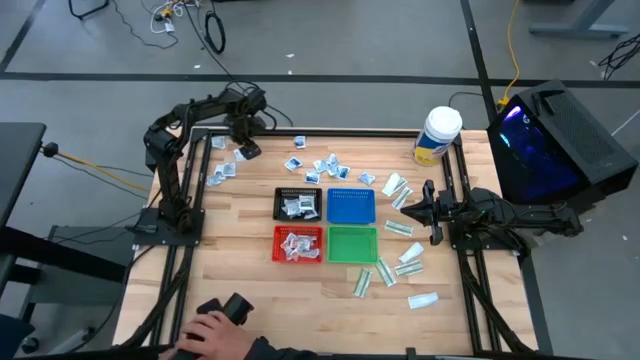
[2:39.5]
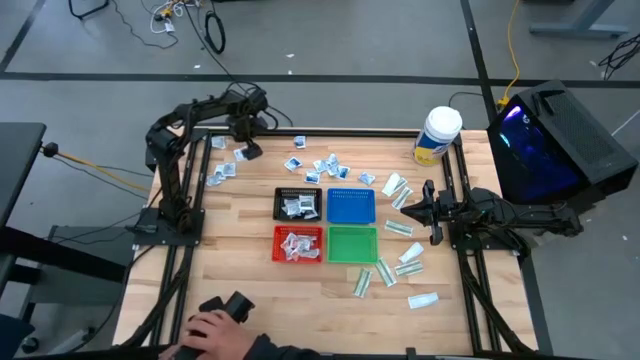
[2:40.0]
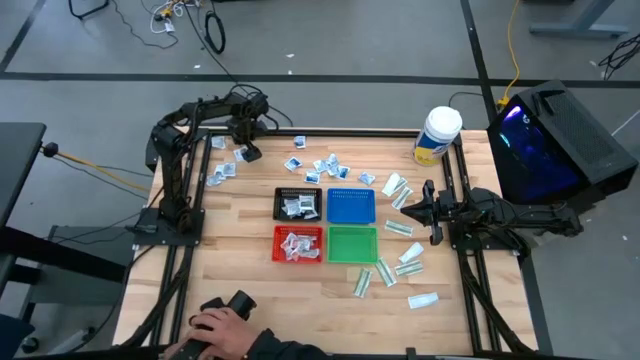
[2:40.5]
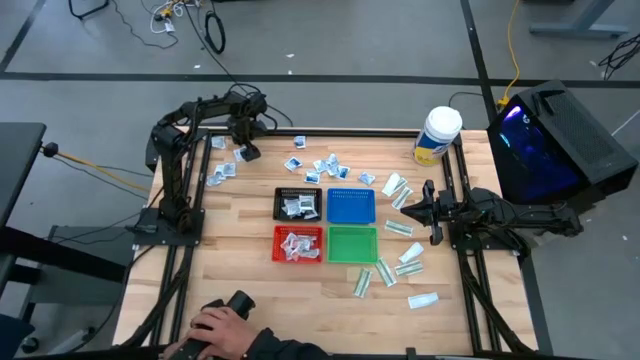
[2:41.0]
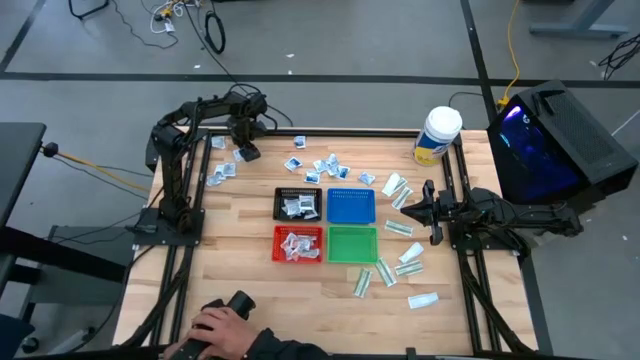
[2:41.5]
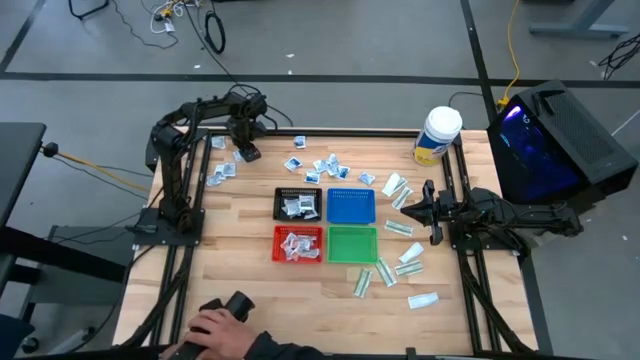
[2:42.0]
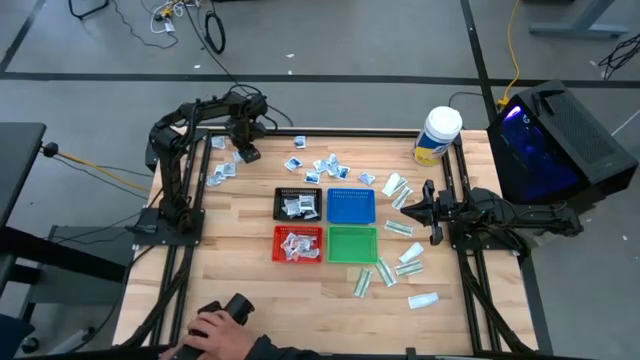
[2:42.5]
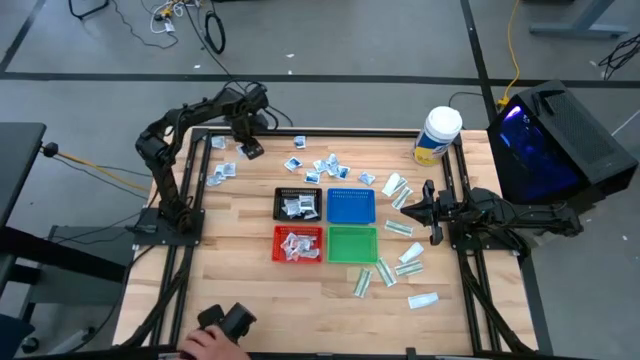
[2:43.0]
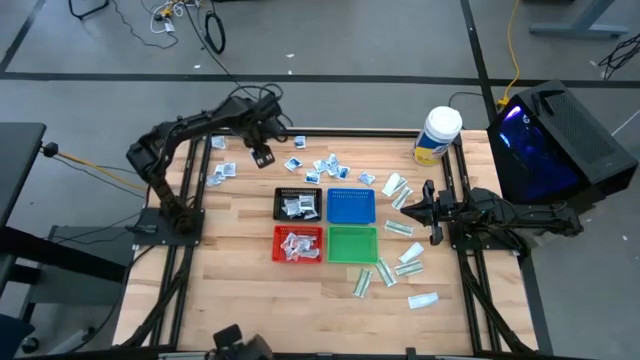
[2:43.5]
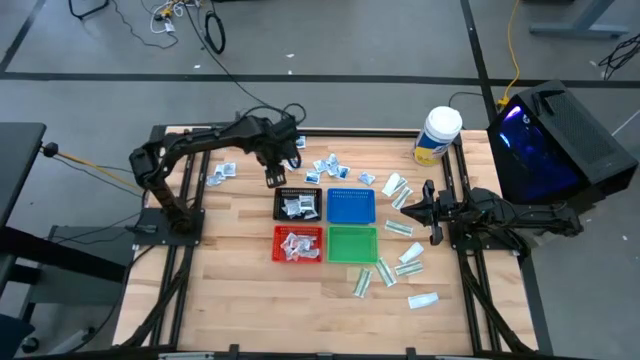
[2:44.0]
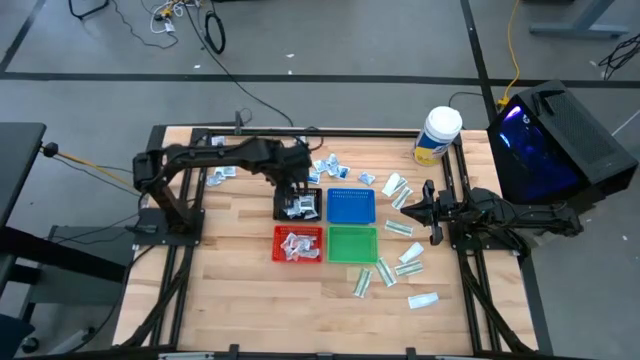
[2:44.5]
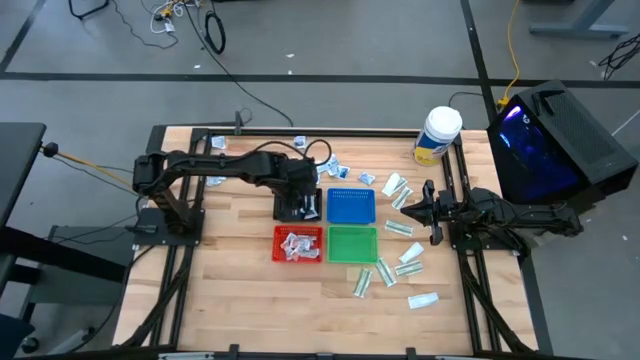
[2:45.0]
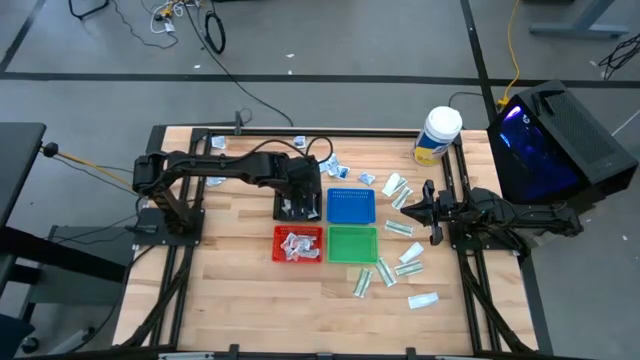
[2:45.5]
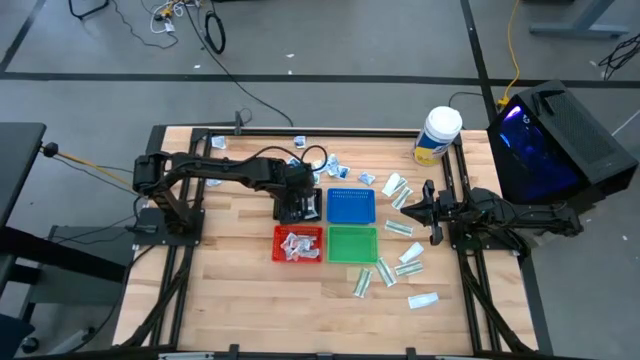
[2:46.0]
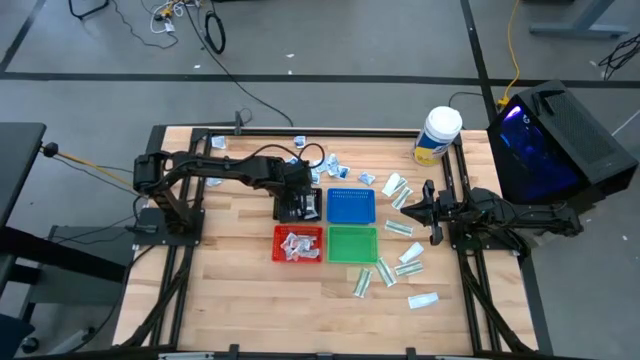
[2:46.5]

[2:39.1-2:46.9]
Task: Pick & Place First Aid Supplies
Put the gray towelette pack into the black bin

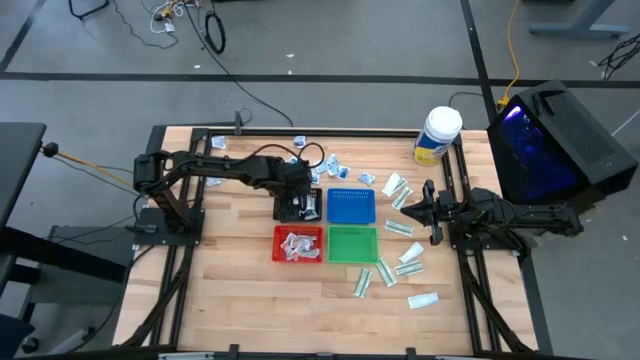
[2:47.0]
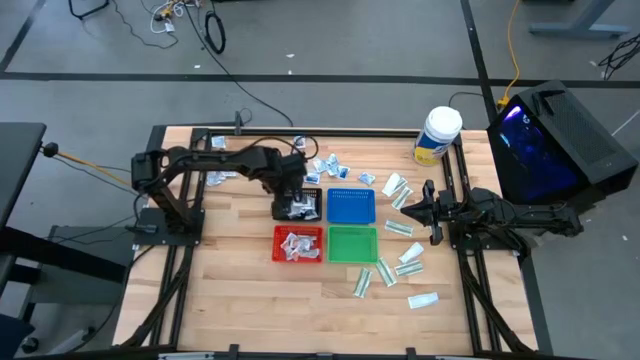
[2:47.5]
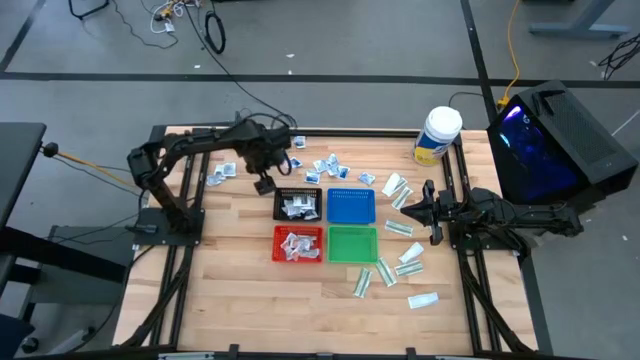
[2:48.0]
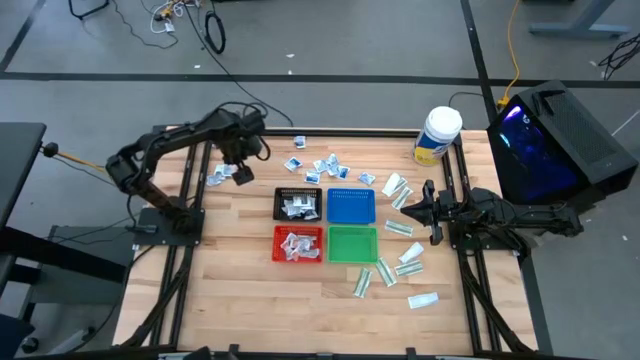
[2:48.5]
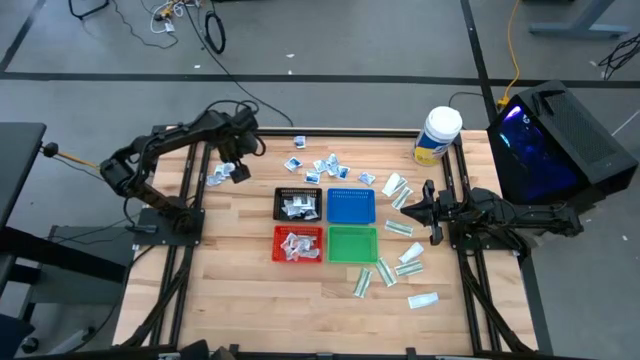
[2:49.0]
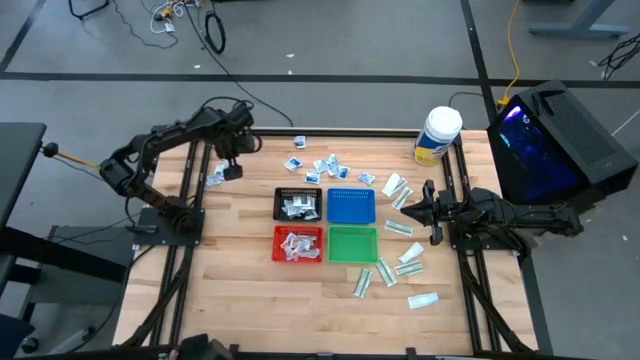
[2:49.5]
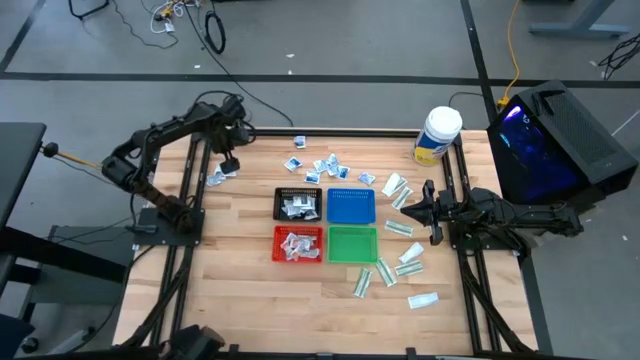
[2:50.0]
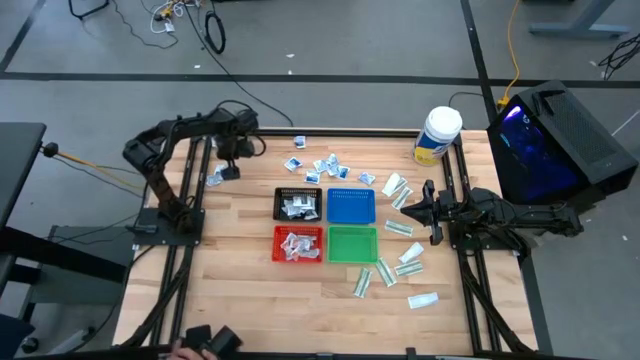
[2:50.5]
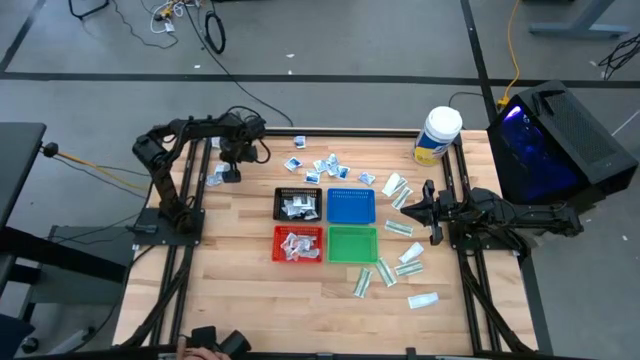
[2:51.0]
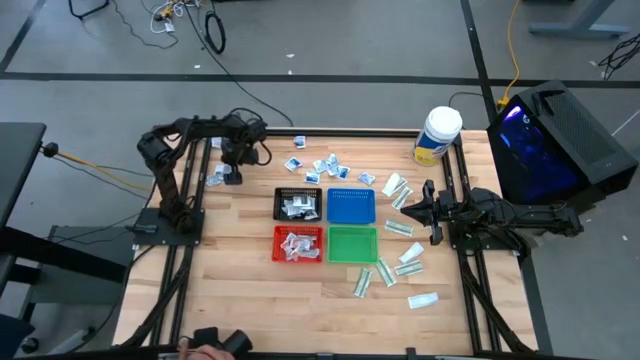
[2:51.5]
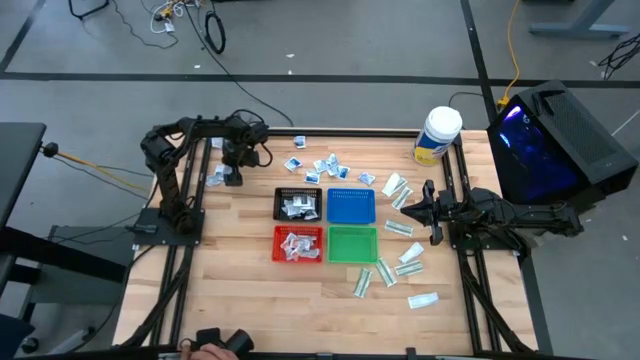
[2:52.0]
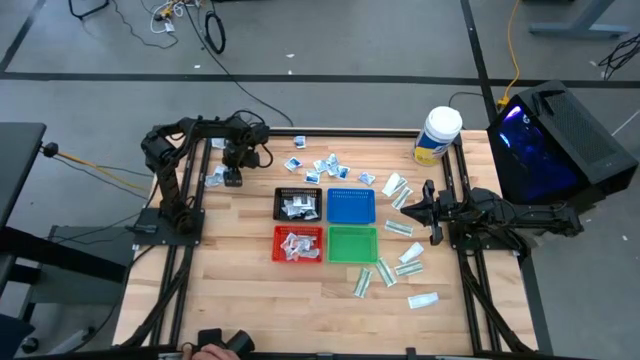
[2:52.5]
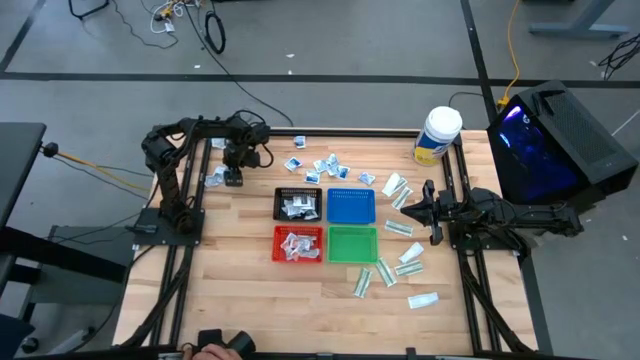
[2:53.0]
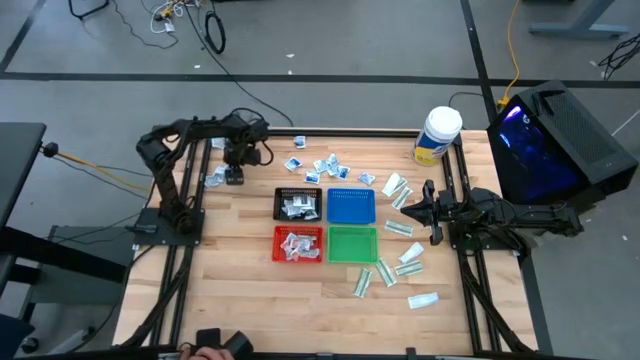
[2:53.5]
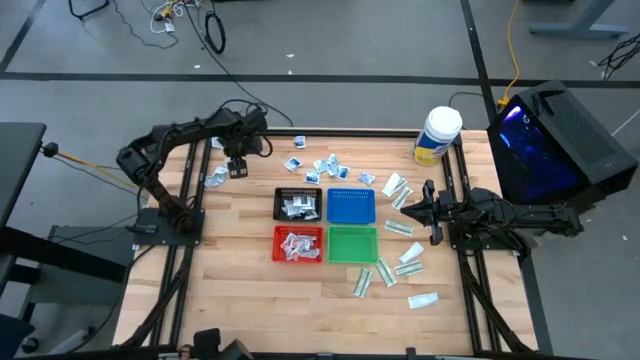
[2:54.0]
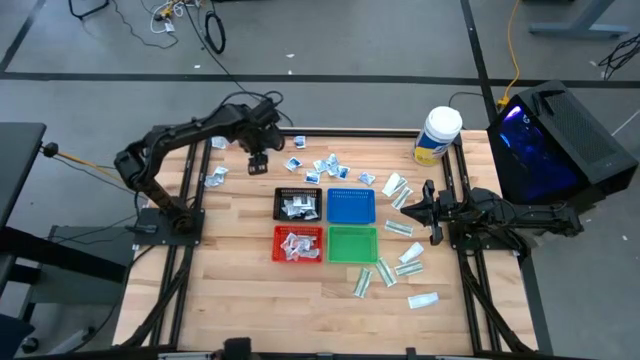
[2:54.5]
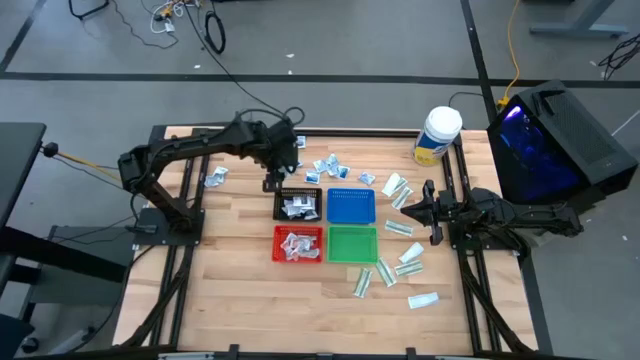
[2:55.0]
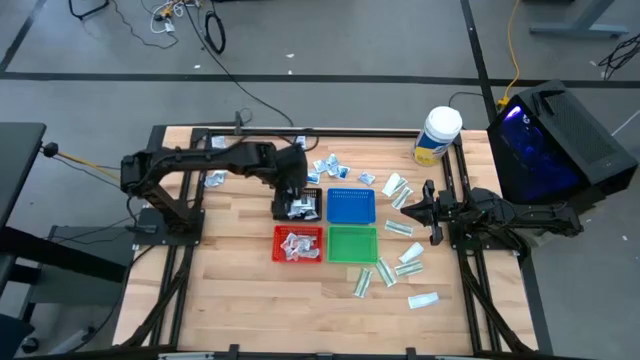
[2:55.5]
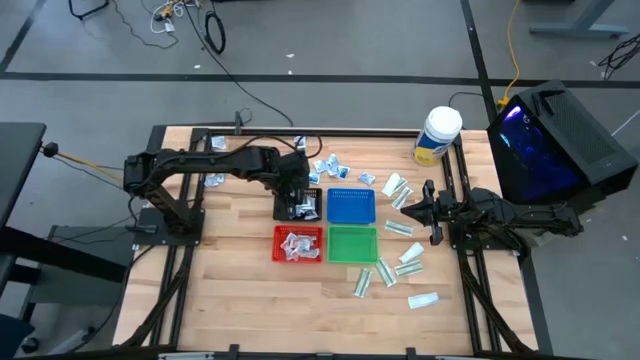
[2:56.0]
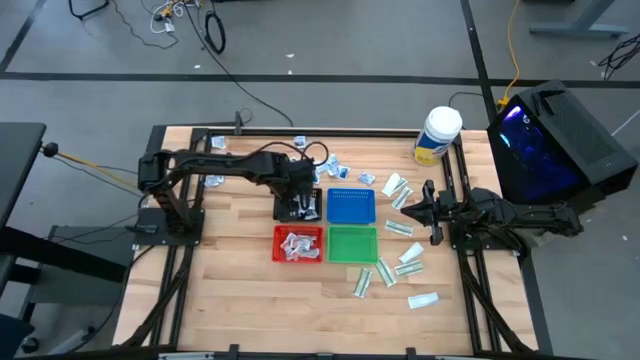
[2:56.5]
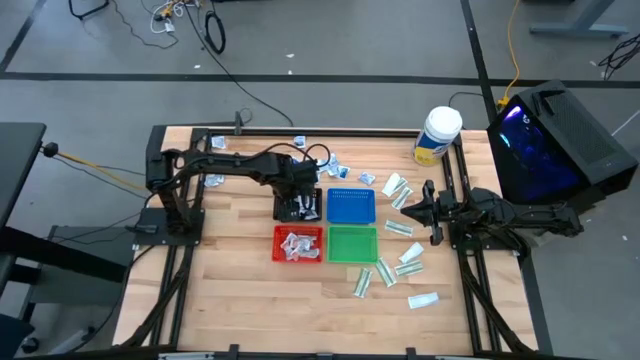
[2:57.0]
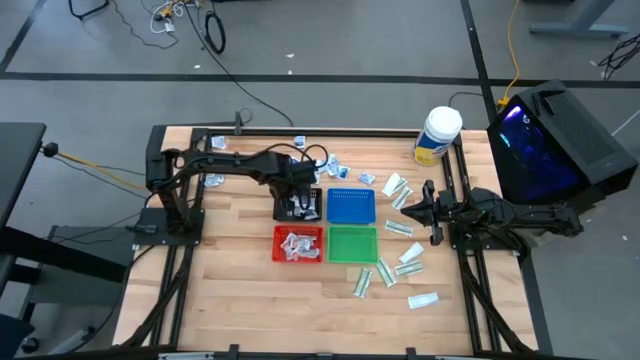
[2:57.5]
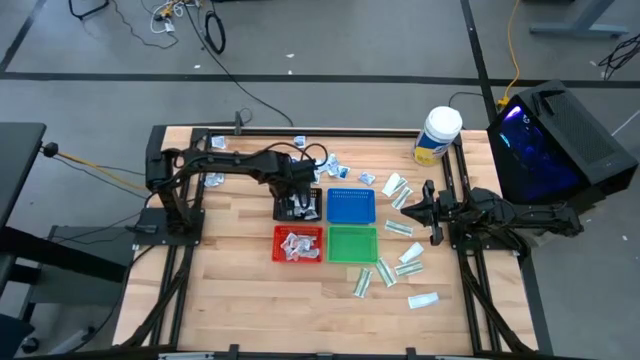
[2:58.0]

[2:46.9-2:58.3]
Put the gray towelette pack into the black bin

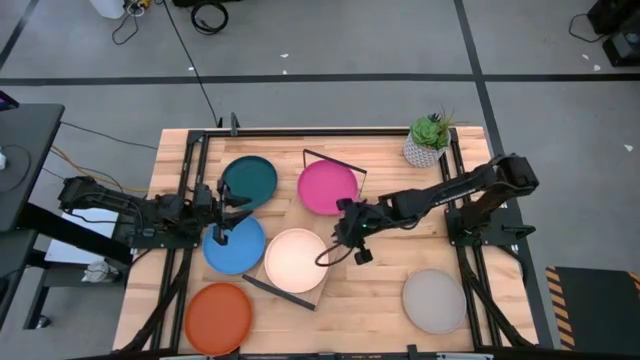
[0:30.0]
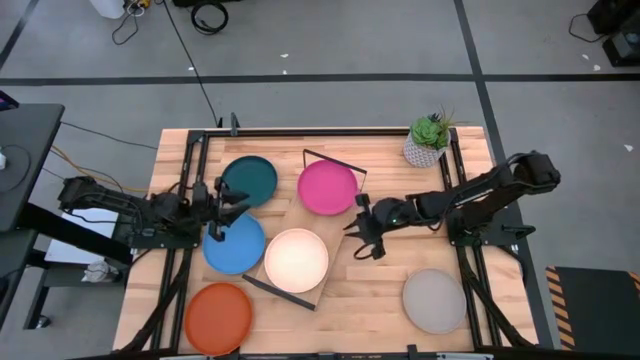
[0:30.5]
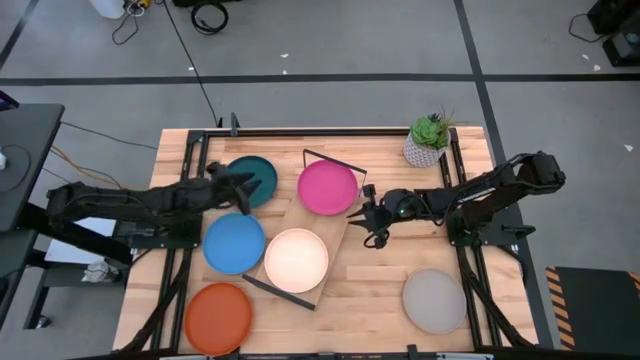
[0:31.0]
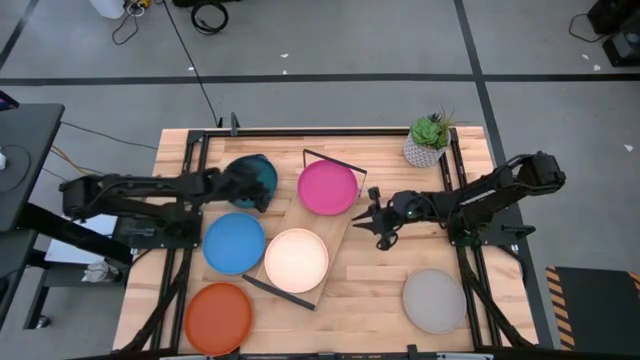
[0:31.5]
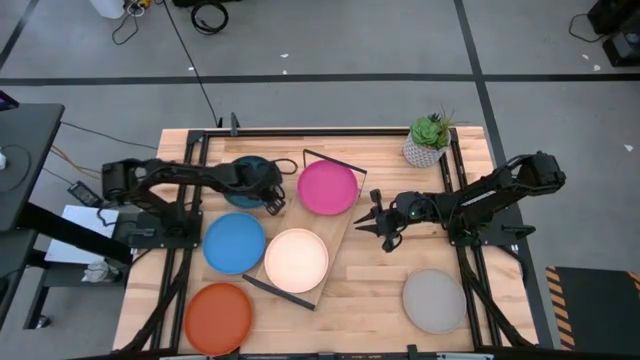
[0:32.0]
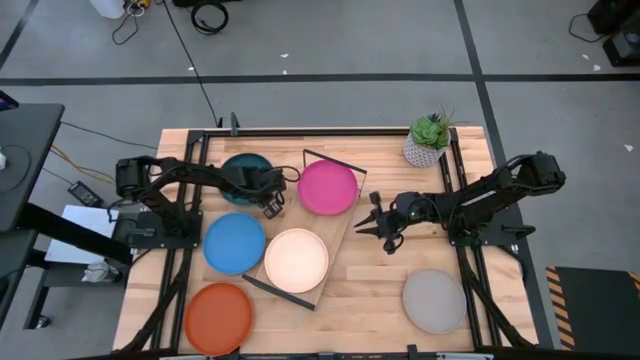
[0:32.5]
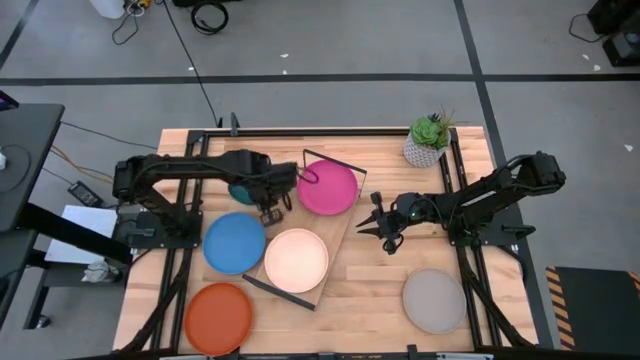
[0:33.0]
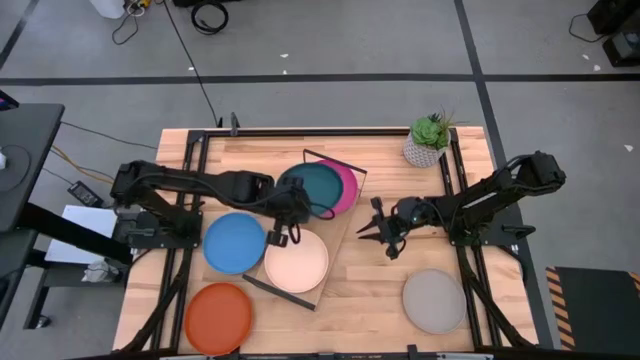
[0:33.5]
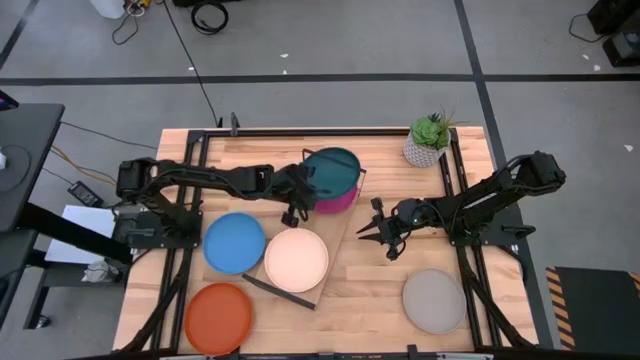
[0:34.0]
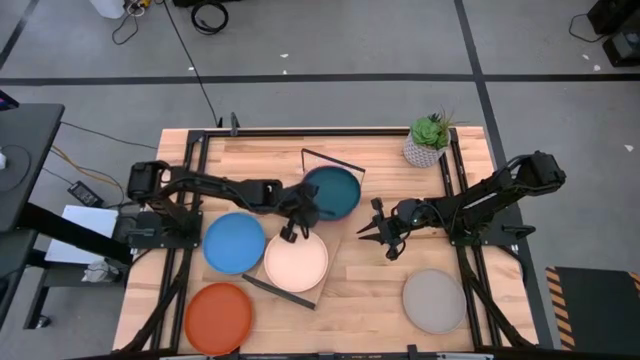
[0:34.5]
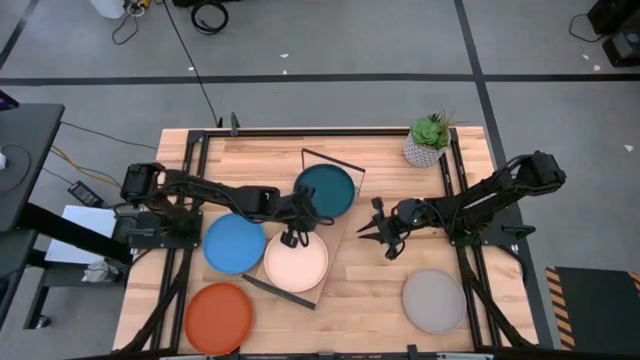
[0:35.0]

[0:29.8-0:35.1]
Task: Place and stack plates onto a shelf
Stack the green plate on the top of the pink plate on the shelf
